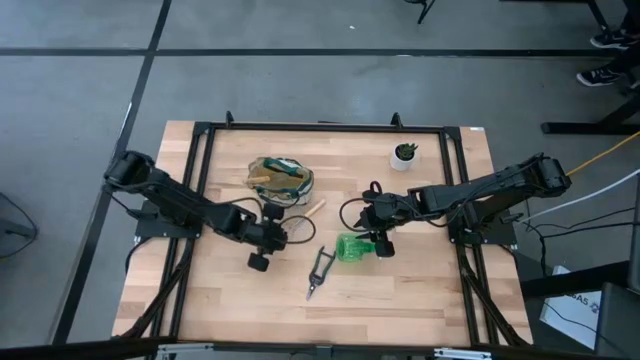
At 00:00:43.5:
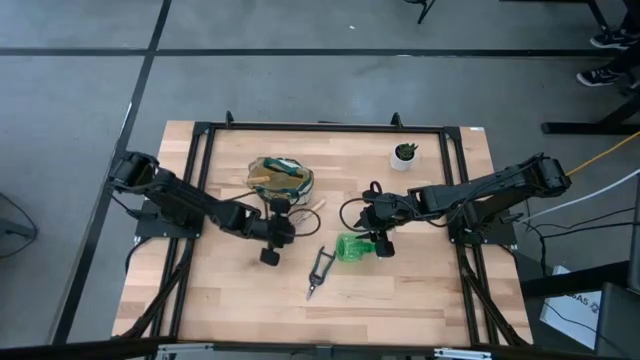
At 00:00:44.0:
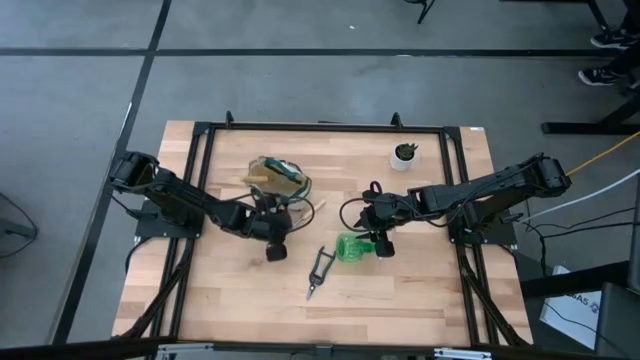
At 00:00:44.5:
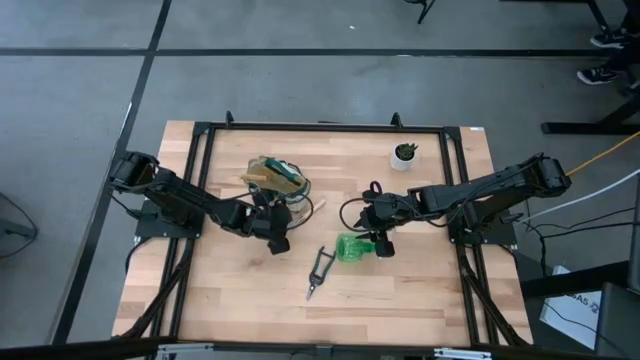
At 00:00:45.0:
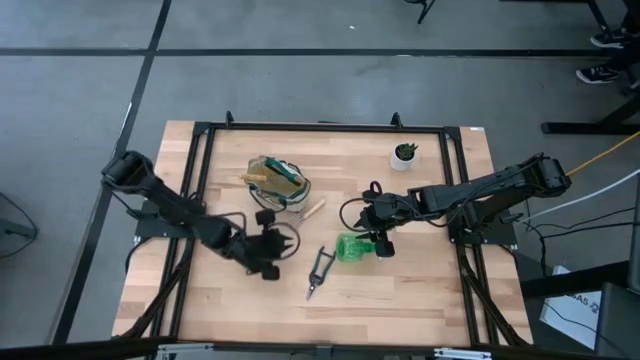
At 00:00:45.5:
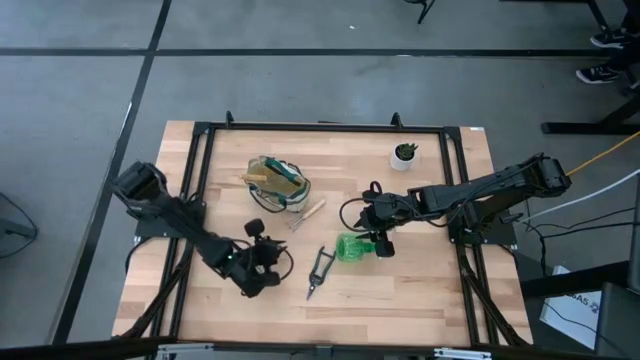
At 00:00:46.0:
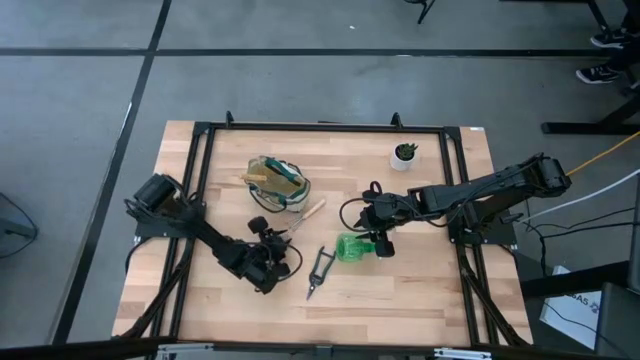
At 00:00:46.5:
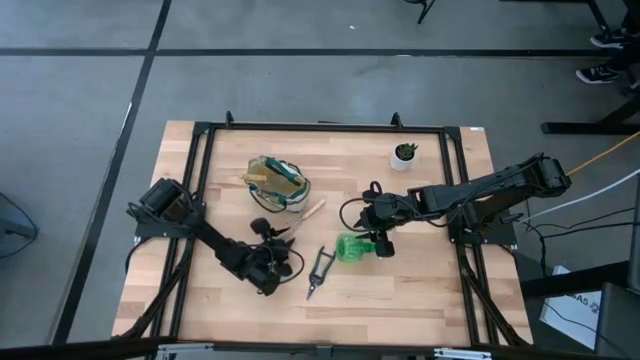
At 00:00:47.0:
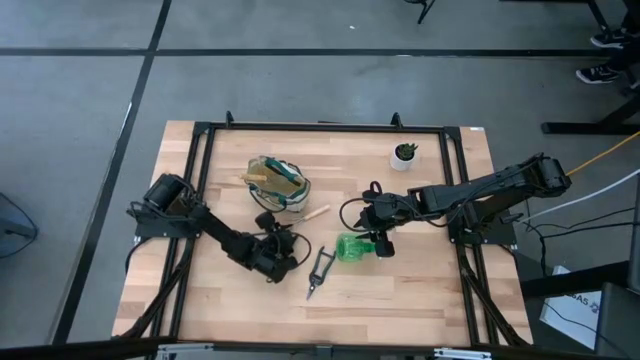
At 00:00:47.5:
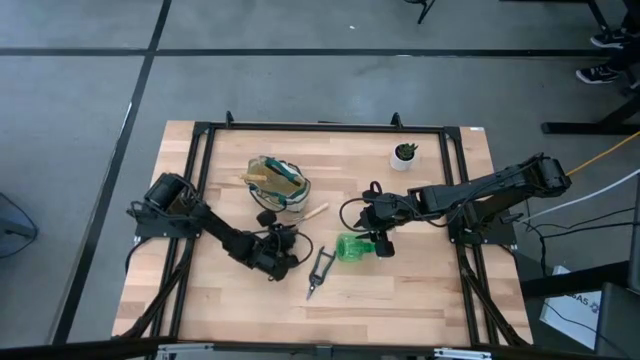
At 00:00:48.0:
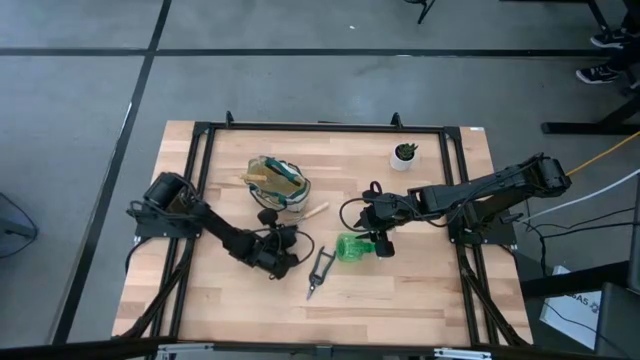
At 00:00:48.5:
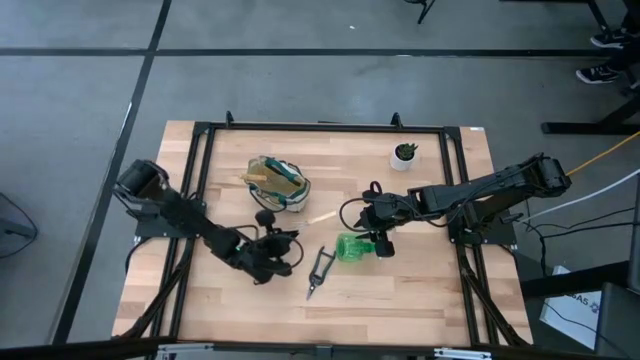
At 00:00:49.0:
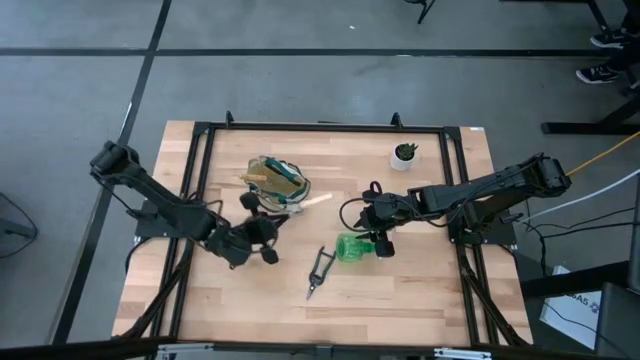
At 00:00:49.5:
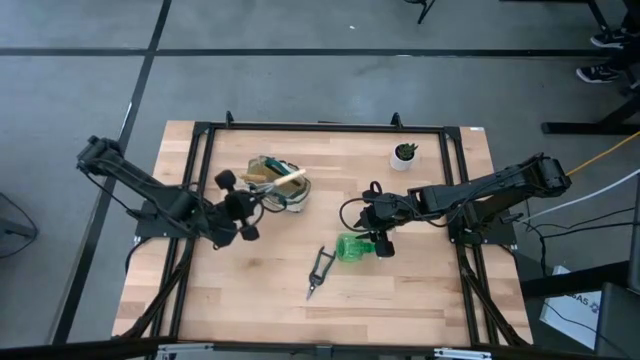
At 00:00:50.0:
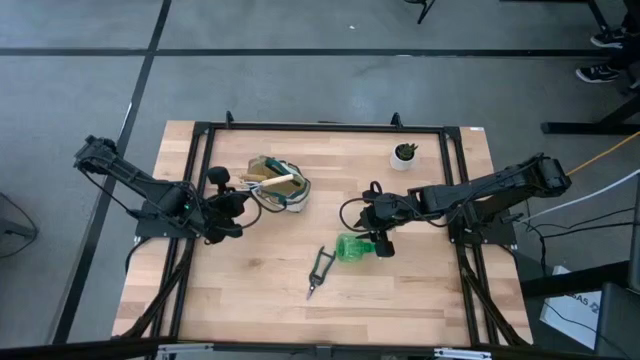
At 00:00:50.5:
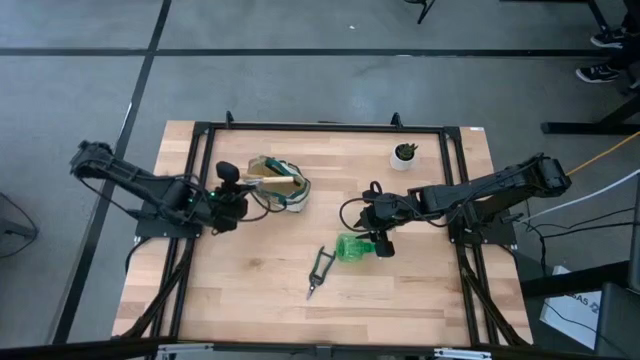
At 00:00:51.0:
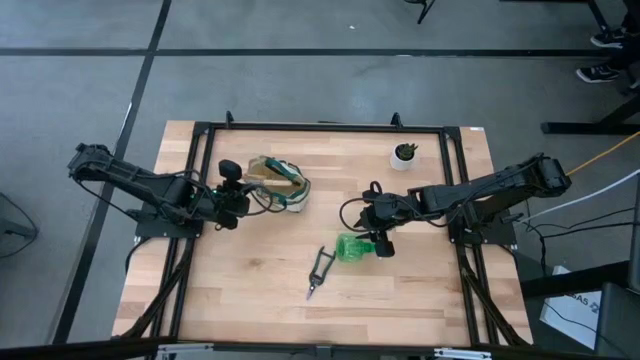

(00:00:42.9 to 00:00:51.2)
Task: Pick & Place Garden tools in Gardening bag
Put the hand rake into the gardening bag

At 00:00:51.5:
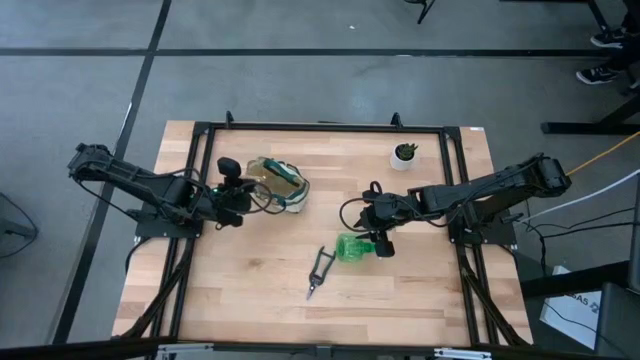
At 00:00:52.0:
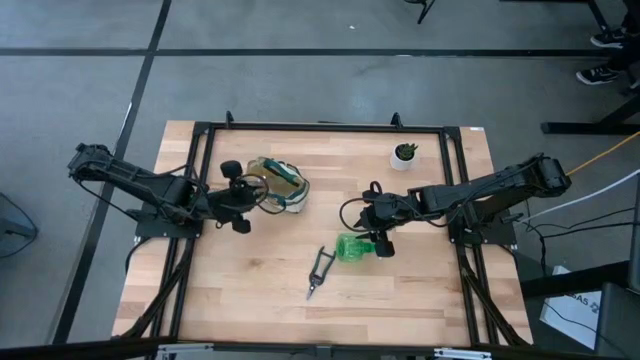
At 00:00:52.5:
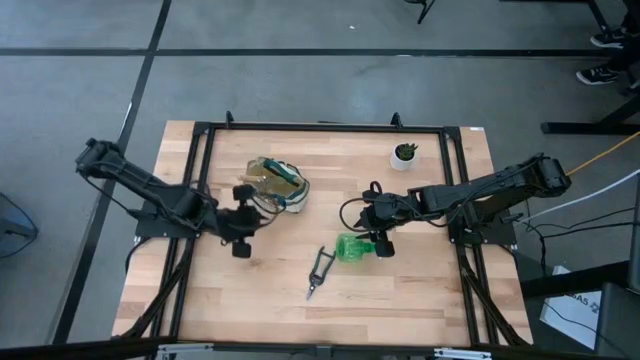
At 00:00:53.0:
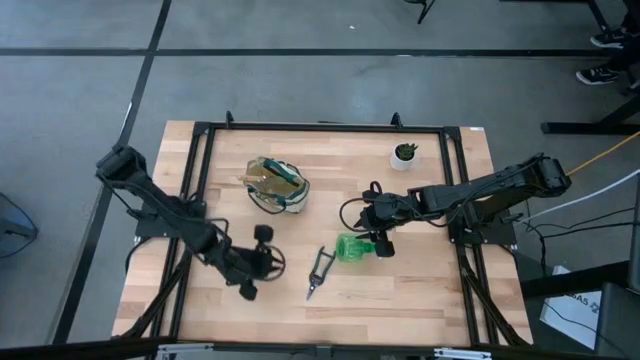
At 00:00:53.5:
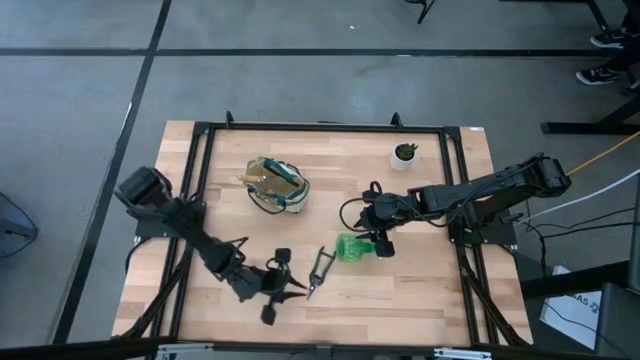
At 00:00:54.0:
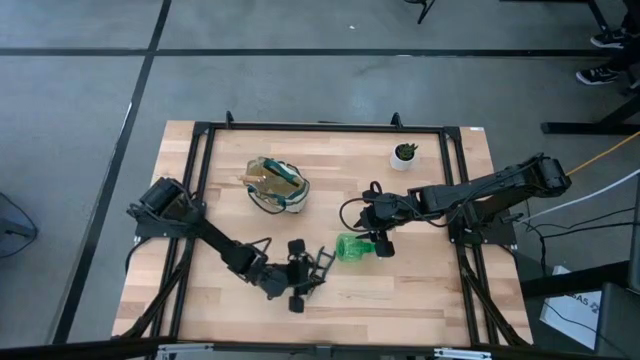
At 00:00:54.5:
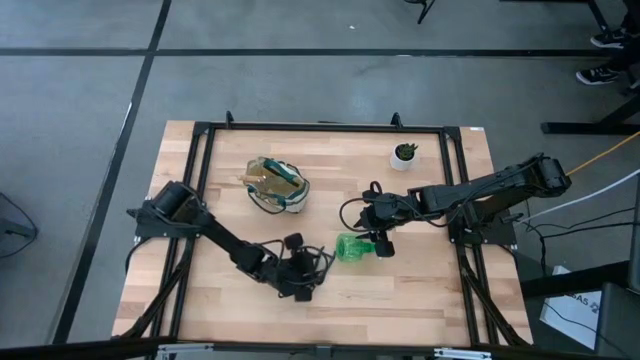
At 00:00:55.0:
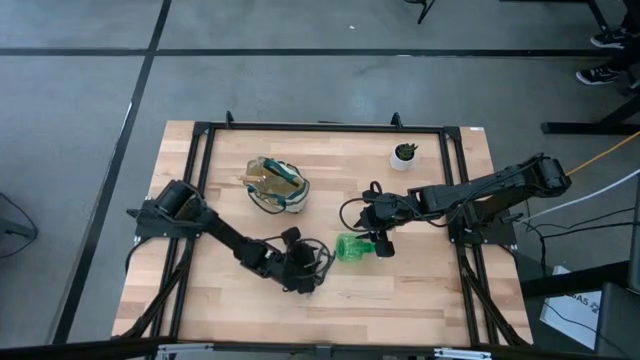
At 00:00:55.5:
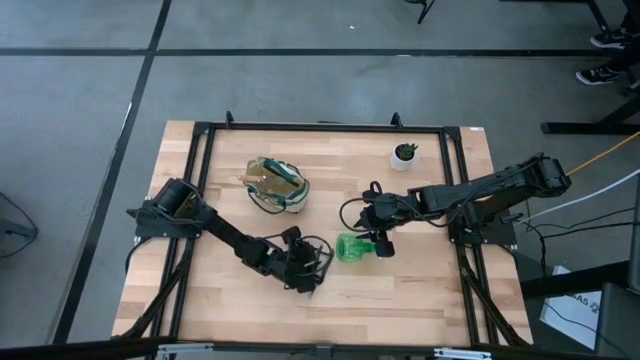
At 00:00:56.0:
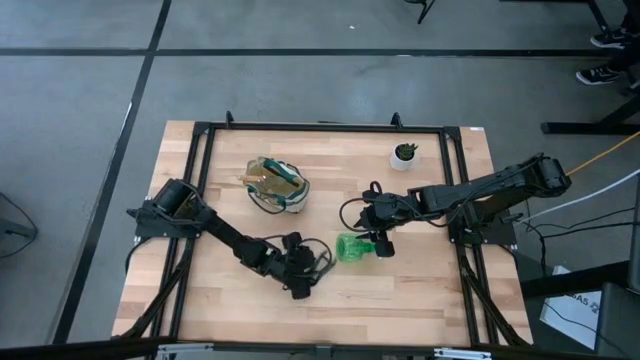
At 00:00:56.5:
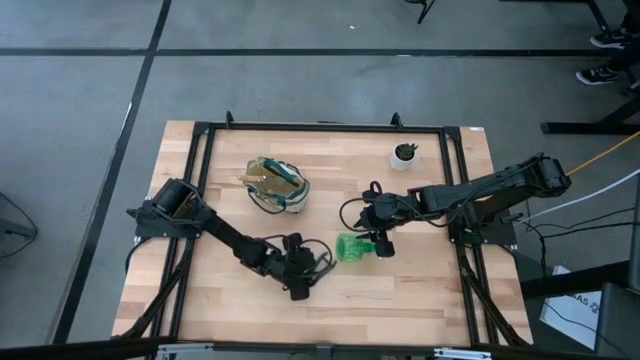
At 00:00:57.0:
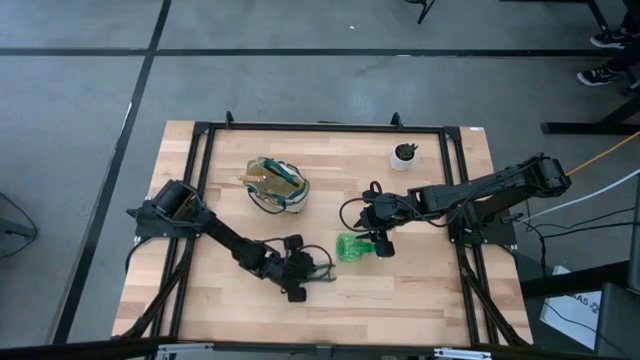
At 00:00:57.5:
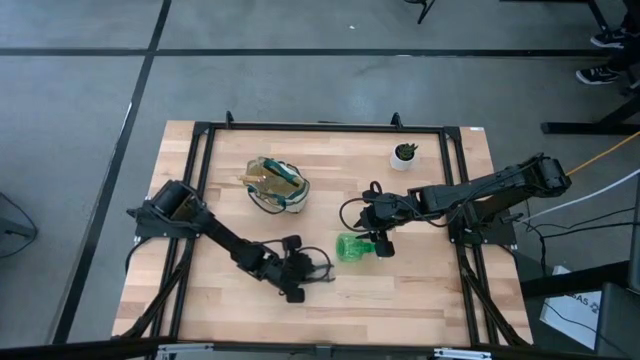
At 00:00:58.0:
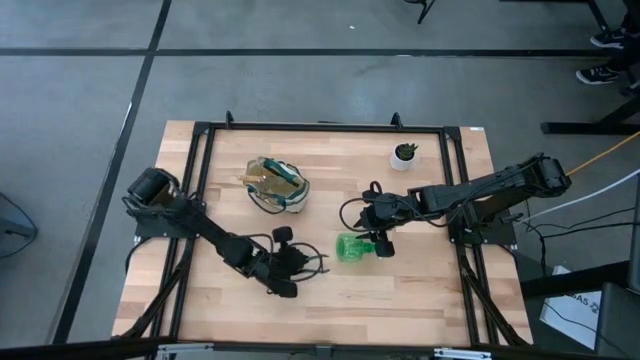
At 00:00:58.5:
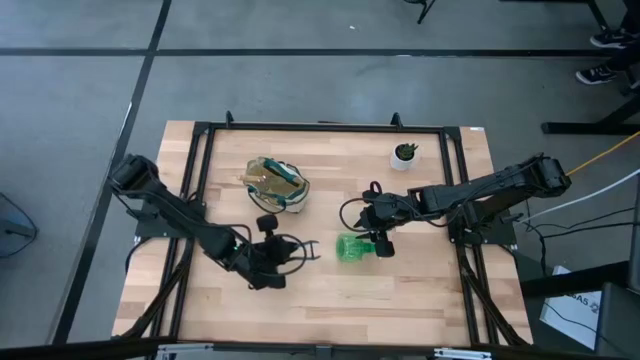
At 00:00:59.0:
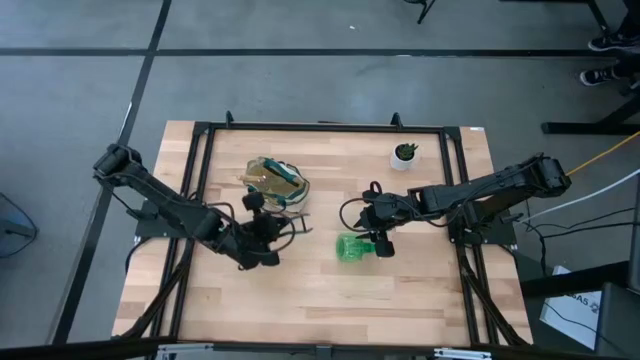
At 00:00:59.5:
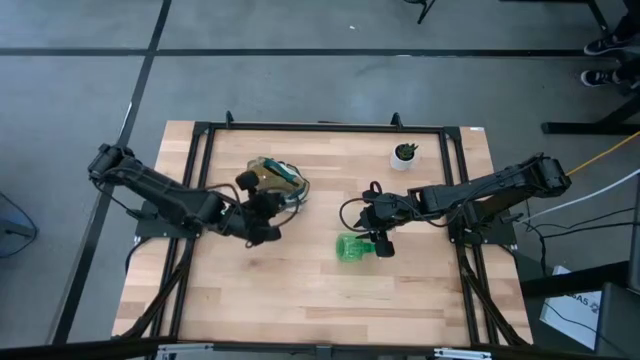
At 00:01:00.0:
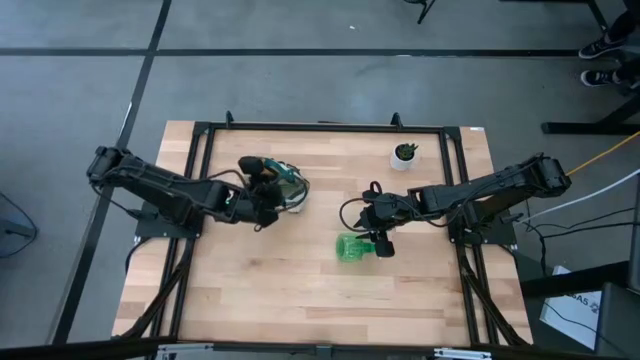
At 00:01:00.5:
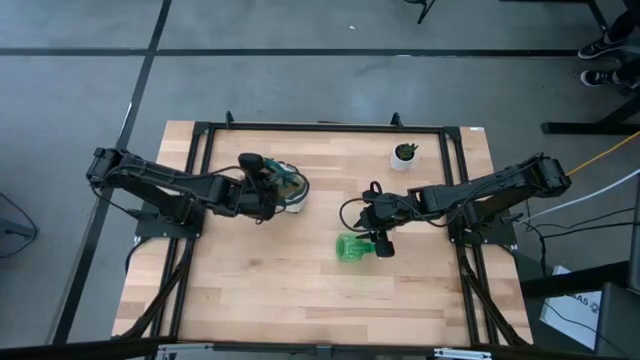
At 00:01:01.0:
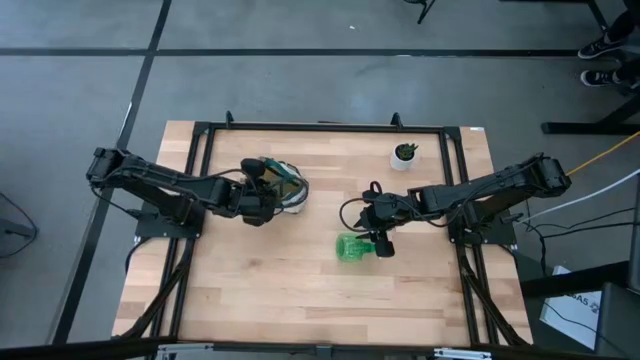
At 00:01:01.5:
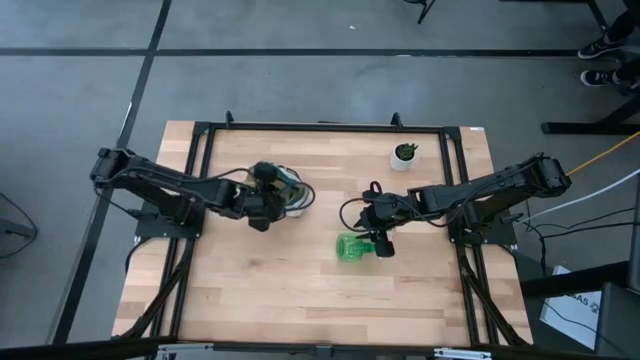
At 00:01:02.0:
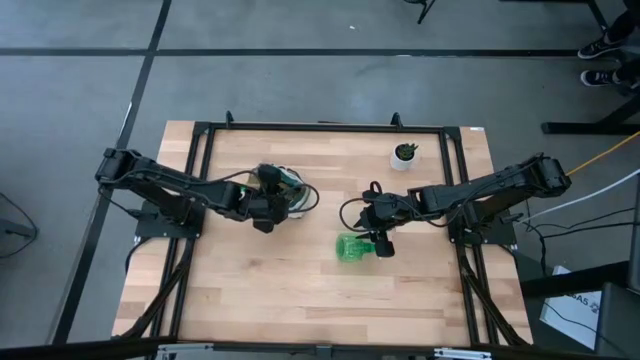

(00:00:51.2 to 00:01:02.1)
Put the shear scissors into the gardening bag

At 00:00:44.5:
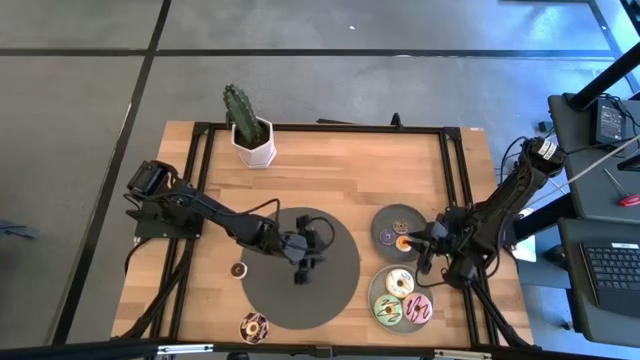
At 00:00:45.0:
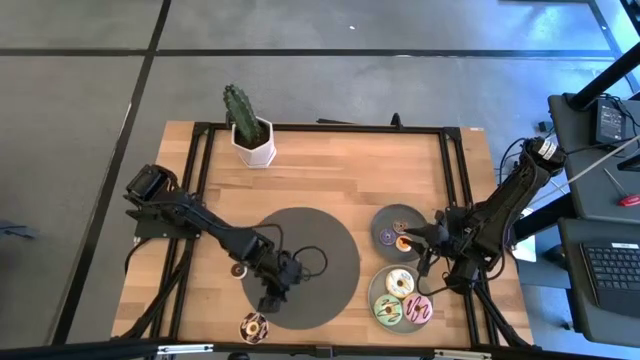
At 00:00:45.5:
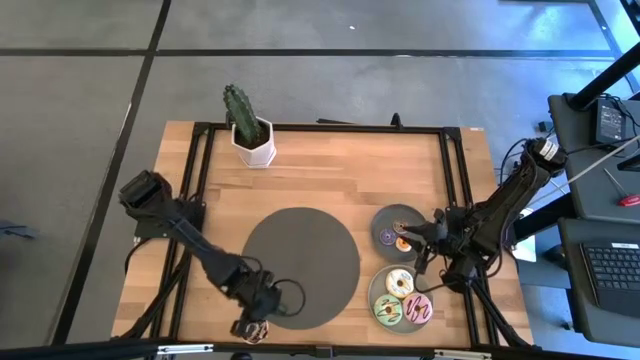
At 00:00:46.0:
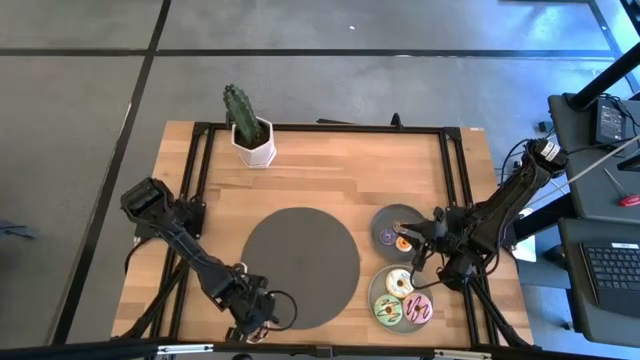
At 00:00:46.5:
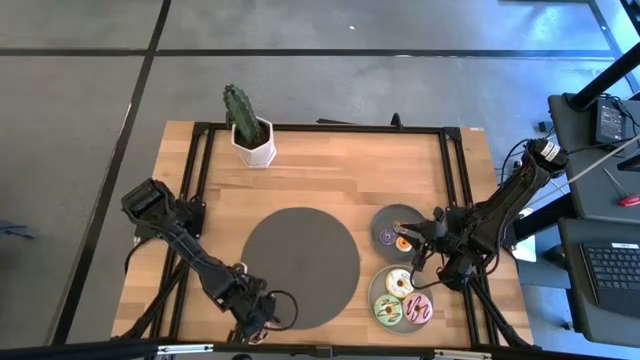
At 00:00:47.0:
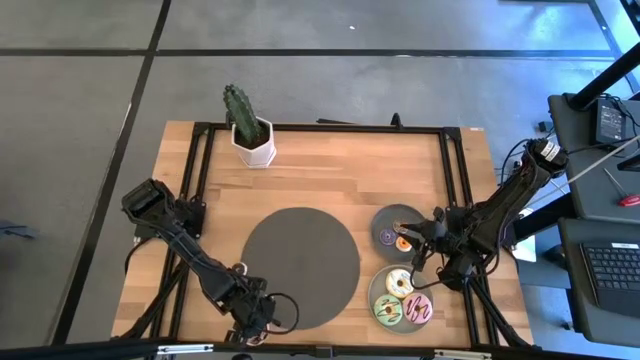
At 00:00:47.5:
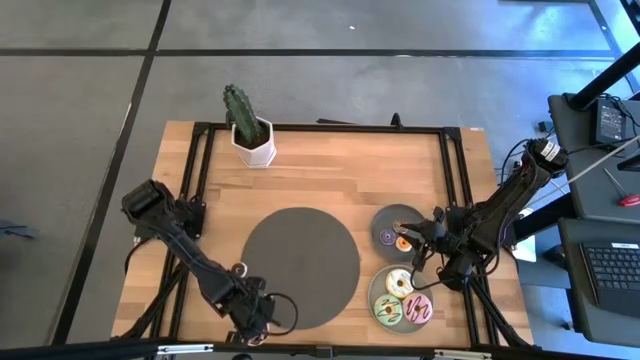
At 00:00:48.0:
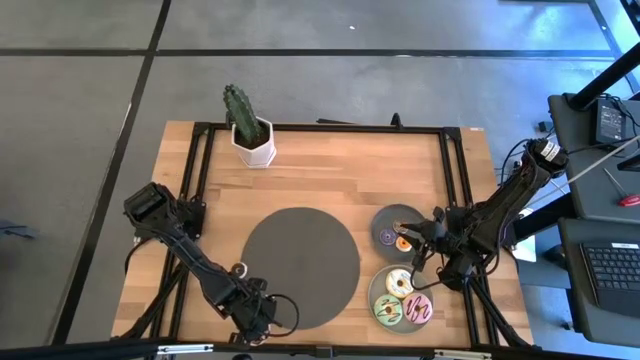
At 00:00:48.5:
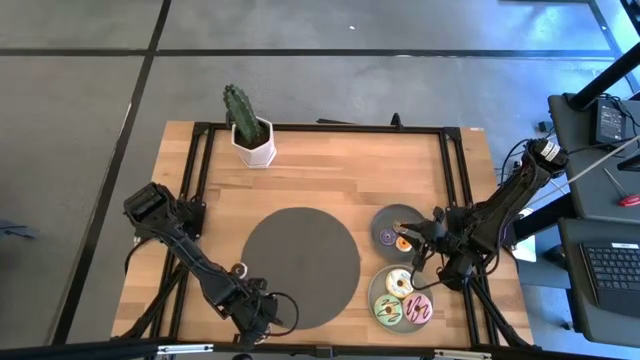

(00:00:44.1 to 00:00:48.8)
Task: Pick & Place donuts
Put the large black donut on the light gray plate
